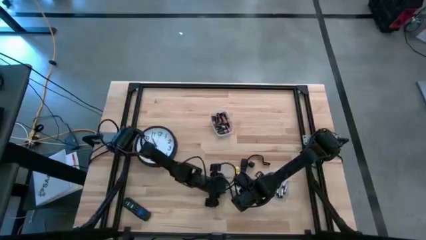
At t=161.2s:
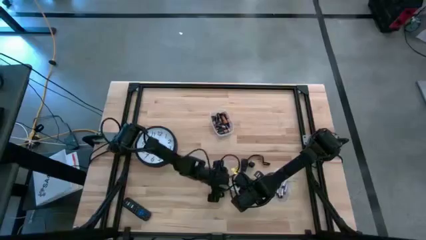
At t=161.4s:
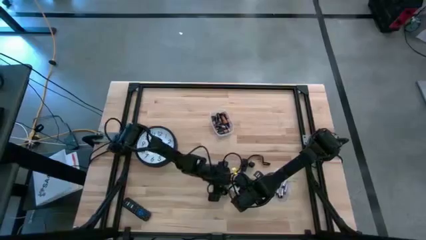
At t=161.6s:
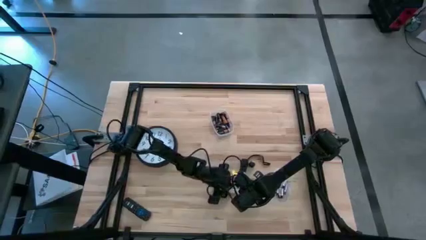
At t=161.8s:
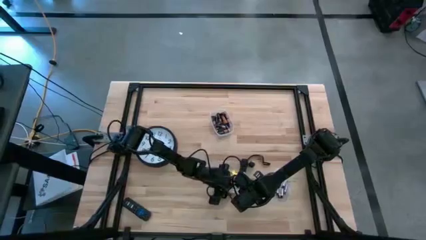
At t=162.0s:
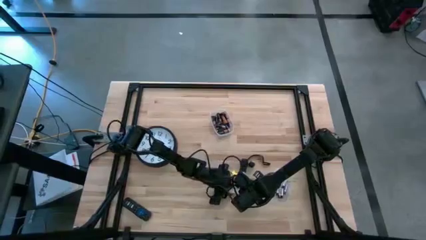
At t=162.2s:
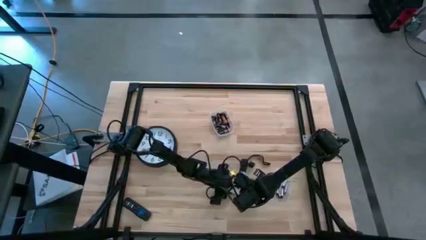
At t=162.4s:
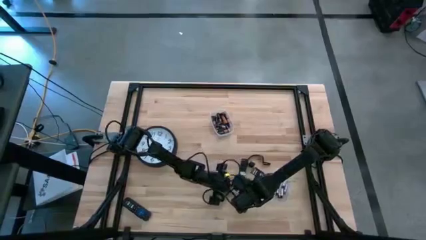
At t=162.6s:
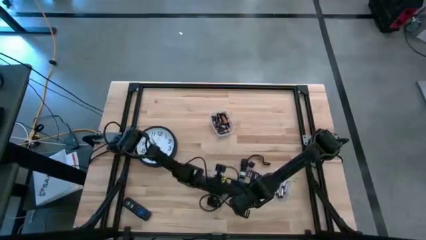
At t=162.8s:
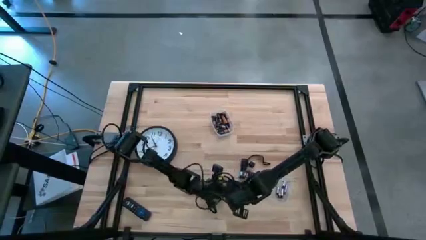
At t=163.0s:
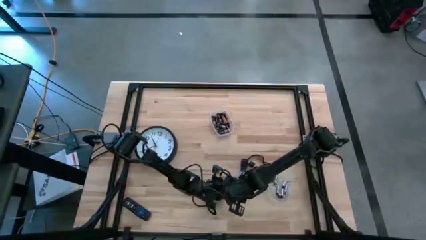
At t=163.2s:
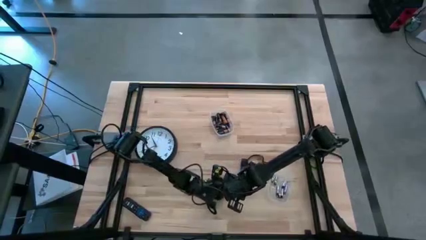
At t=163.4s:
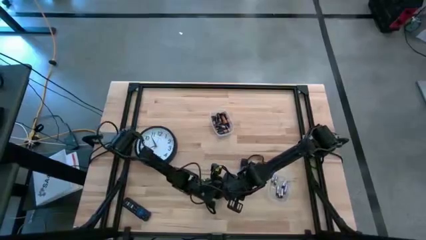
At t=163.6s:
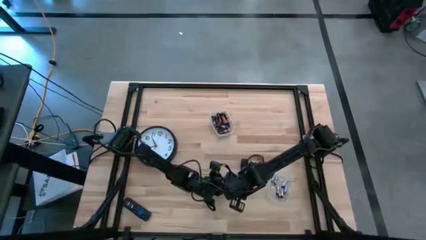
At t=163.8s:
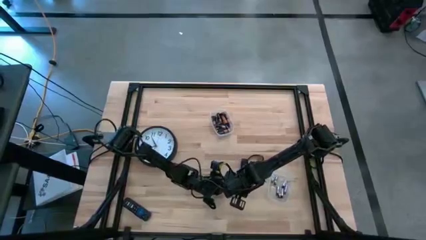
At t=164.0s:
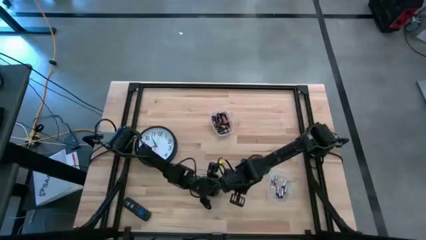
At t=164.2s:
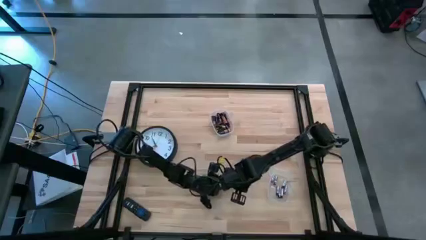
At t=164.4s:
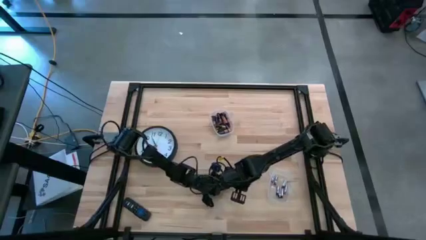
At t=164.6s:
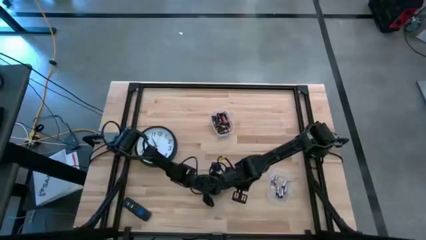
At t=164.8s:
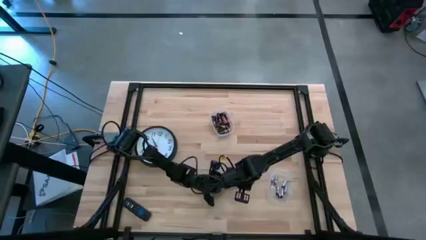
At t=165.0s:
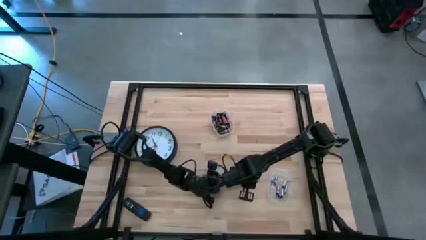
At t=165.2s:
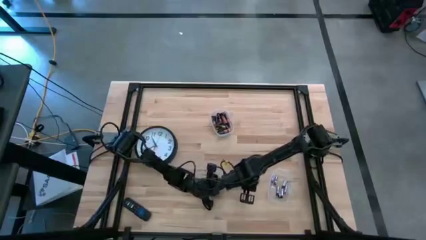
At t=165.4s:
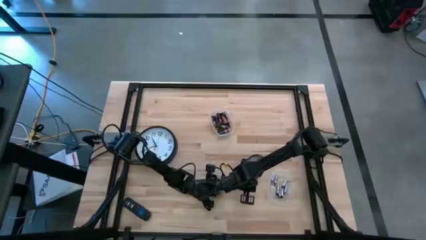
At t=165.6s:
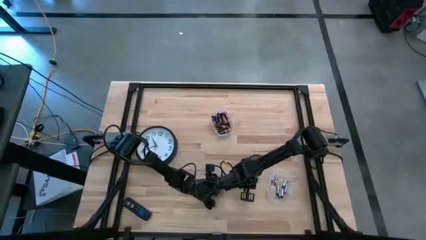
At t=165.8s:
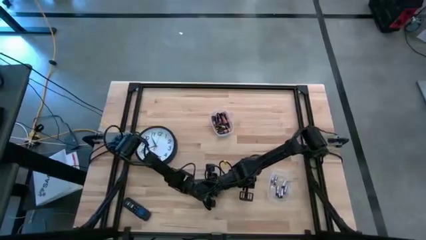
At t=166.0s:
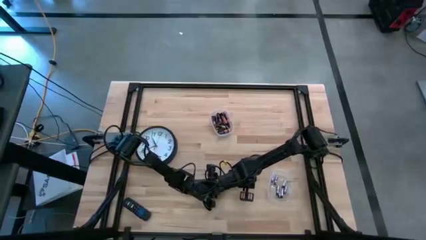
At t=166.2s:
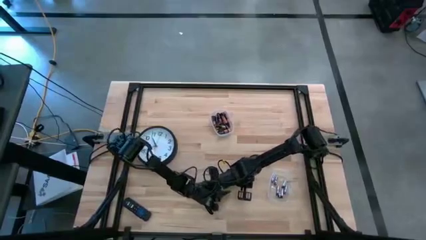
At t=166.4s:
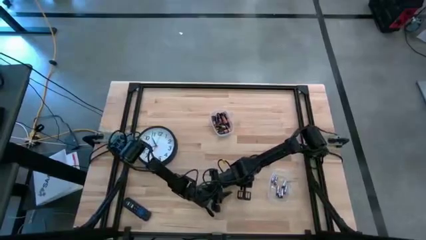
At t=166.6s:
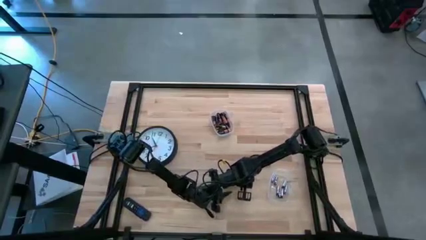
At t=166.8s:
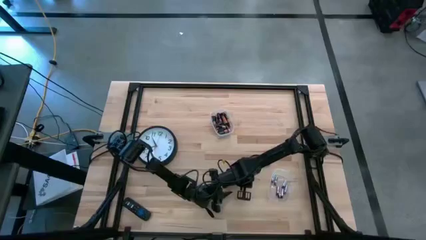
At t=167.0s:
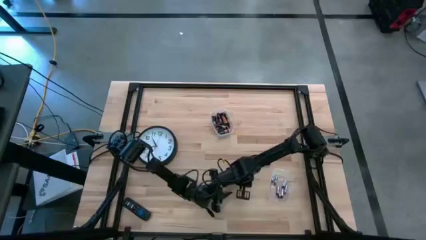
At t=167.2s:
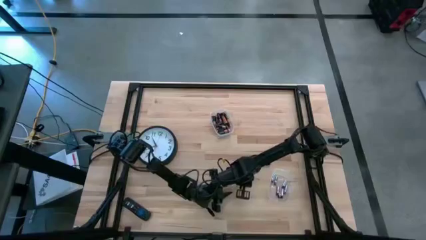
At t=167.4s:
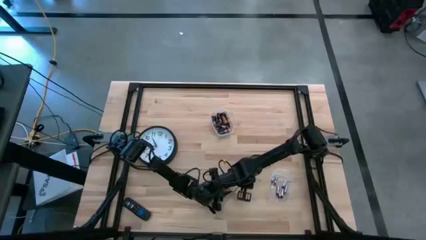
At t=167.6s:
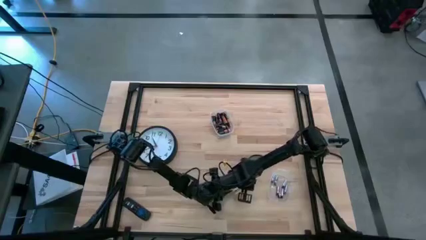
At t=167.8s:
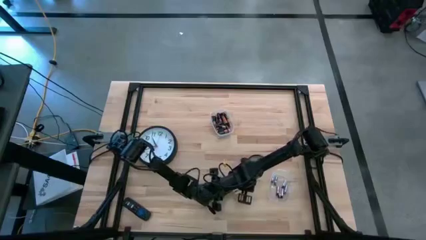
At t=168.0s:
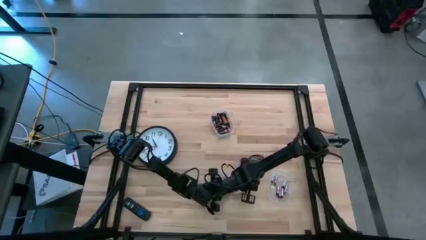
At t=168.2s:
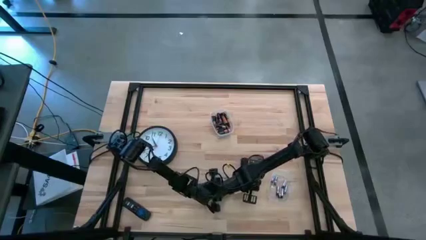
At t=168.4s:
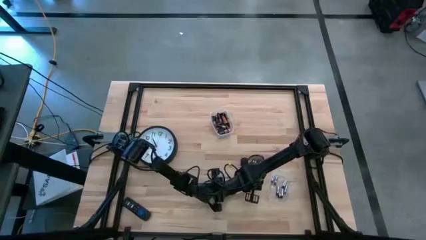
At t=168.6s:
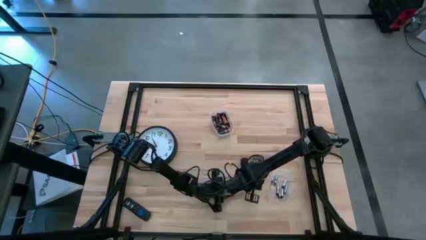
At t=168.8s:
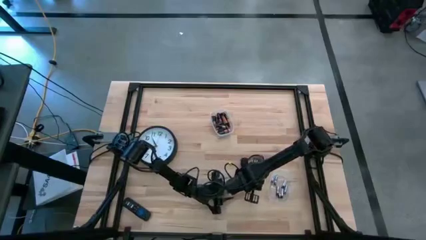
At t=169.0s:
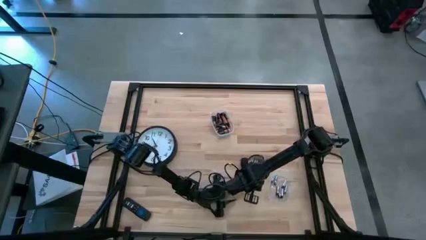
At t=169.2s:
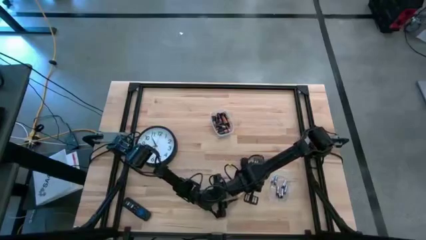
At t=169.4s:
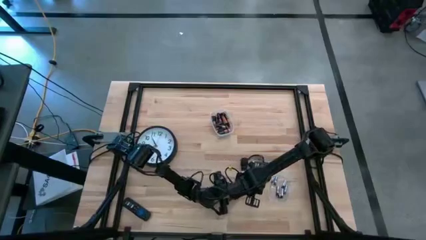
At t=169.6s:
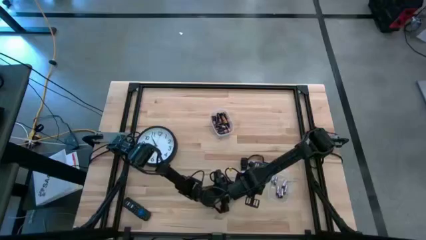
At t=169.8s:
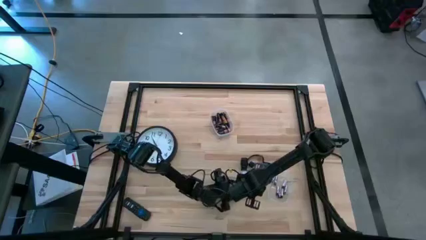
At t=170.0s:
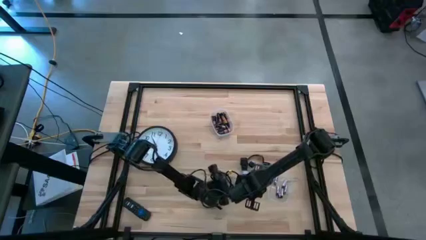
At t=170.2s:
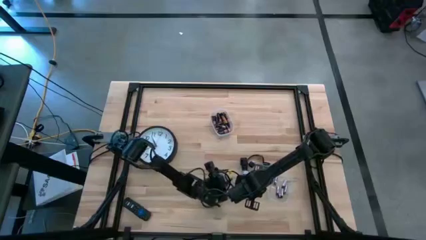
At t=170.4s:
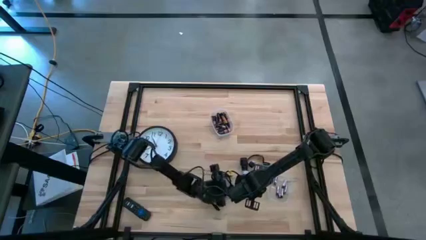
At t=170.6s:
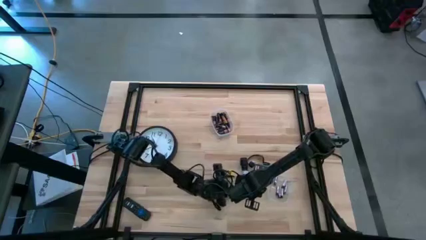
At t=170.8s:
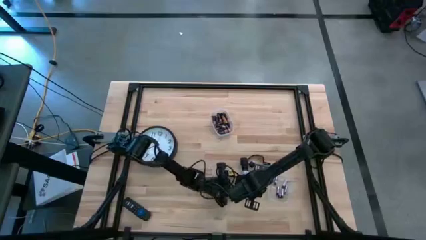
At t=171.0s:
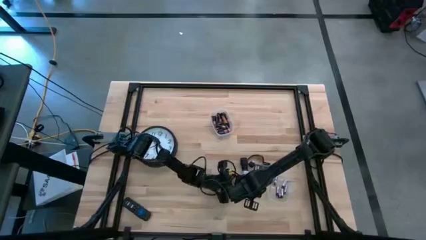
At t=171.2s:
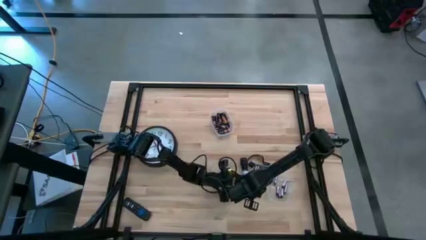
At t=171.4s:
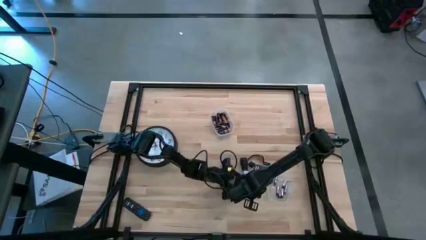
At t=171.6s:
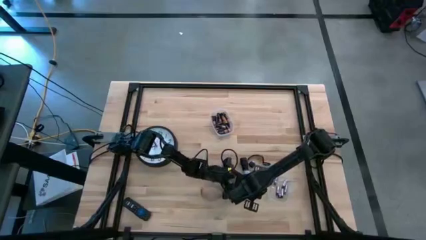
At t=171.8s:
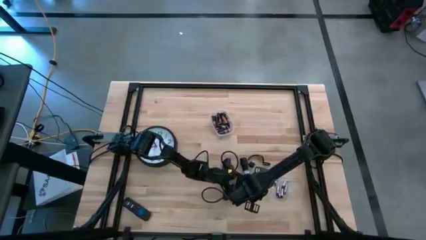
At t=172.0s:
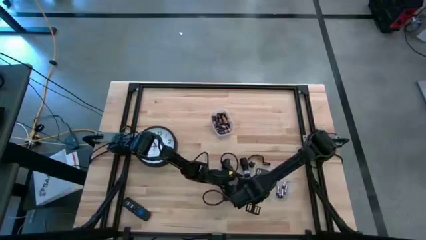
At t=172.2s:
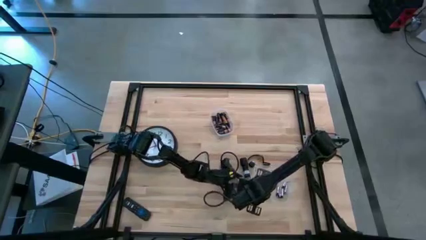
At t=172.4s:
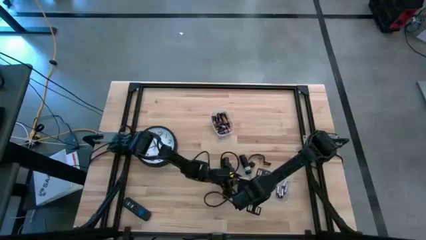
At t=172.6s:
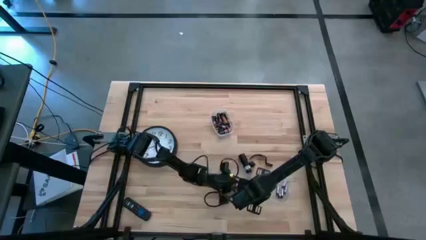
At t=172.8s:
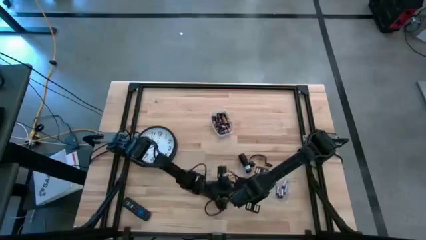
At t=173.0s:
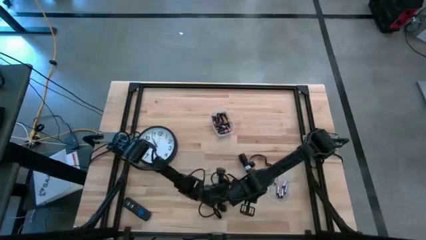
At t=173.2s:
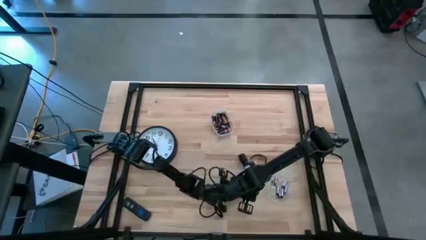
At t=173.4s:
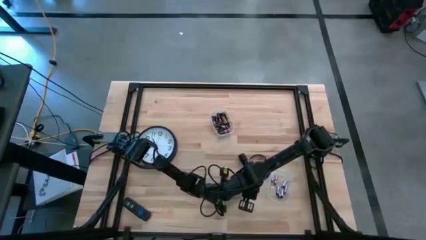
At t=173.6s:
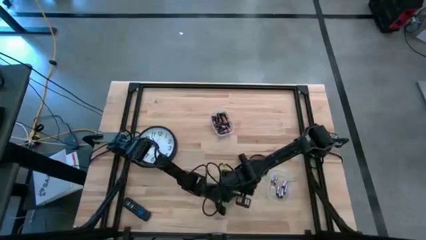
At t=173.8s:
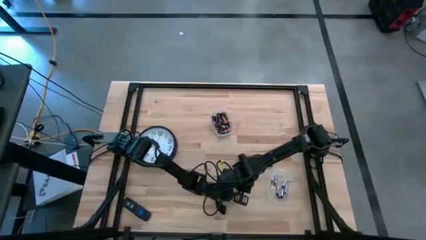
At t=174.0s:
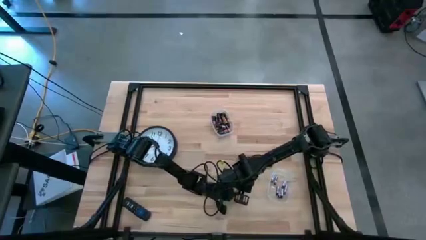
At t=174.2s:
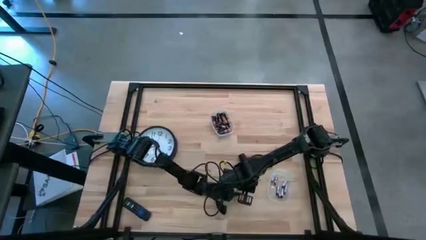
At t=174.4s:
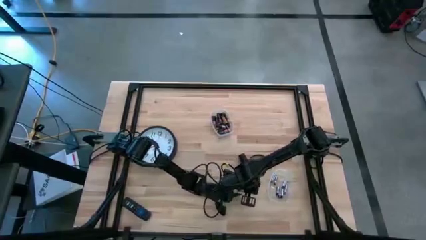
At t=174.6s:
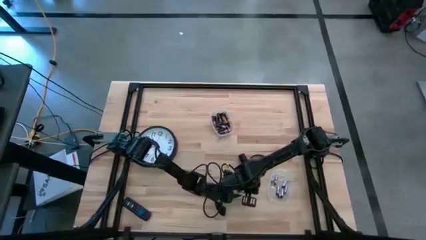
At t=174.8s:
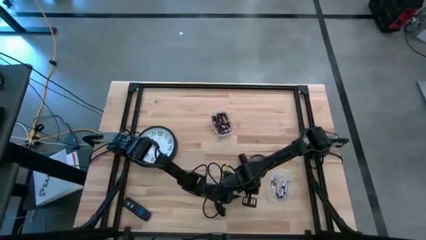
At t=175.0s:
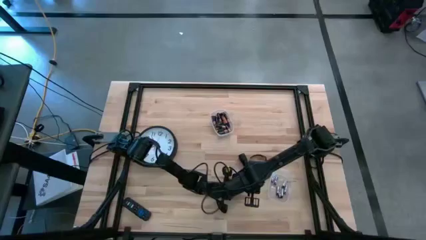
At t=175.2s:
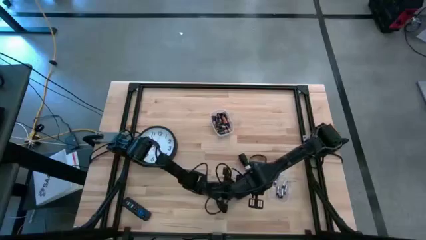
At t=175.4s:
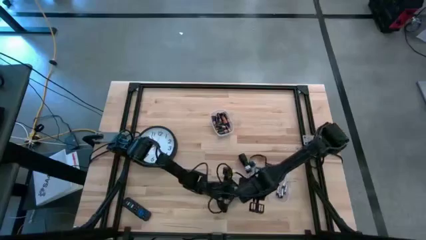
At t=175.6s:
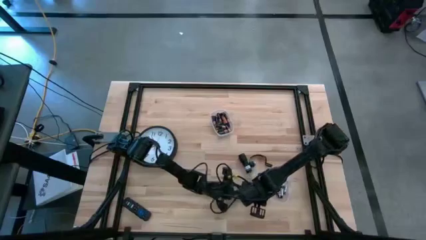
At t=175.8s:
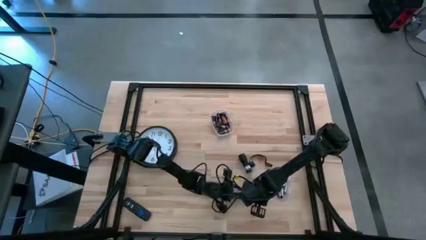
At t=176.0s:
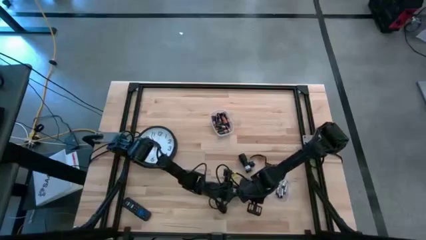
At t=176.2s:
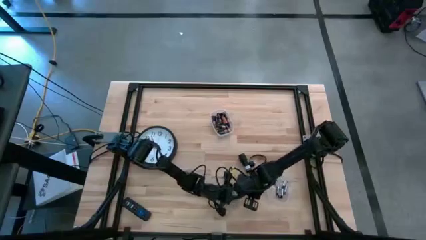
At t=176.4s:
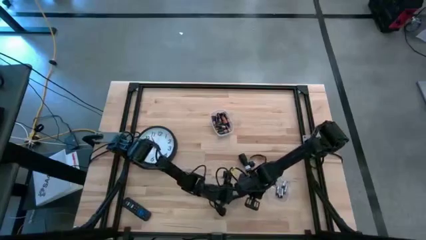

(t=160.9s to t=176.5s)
Task: Insert battery
Insert the silver battery into the battery holder
